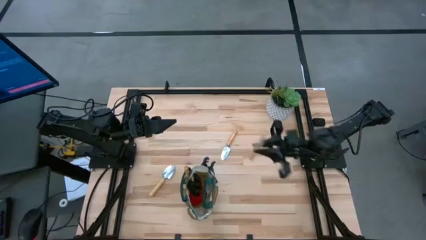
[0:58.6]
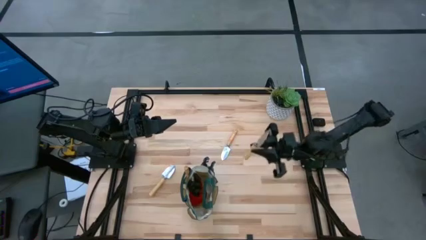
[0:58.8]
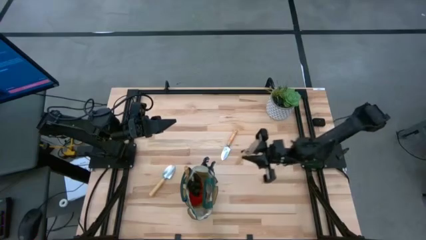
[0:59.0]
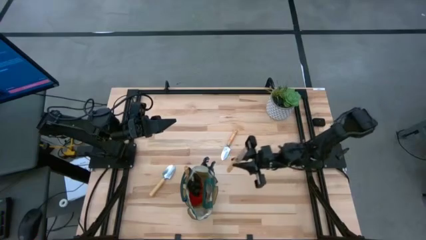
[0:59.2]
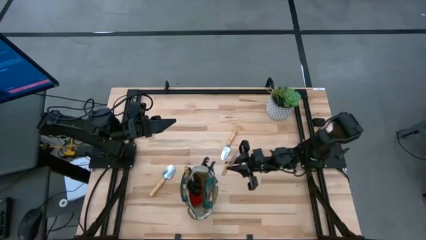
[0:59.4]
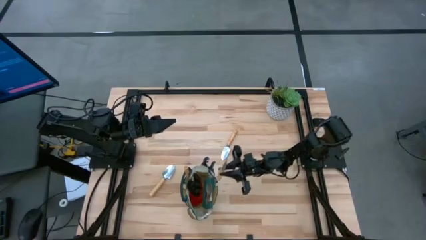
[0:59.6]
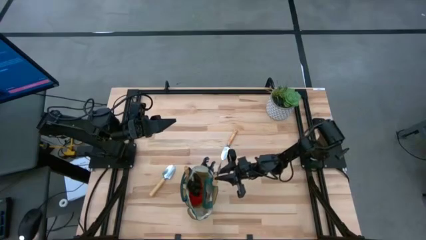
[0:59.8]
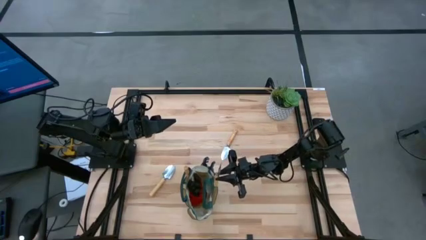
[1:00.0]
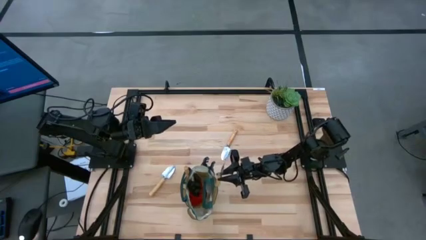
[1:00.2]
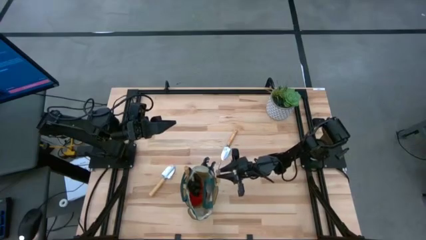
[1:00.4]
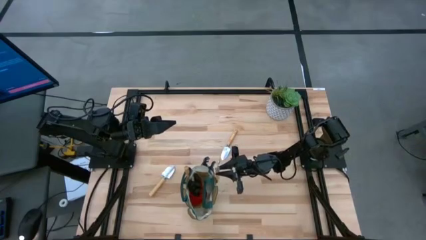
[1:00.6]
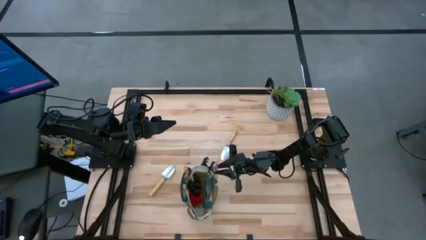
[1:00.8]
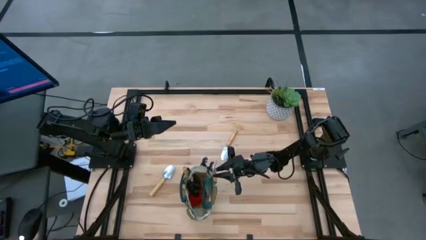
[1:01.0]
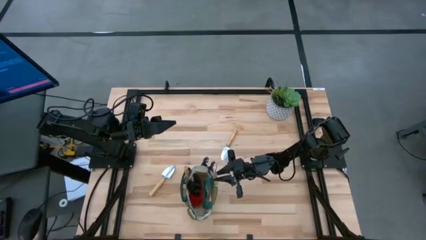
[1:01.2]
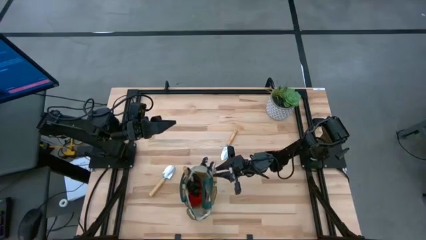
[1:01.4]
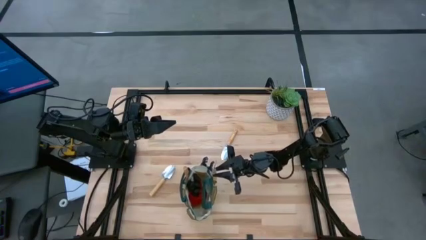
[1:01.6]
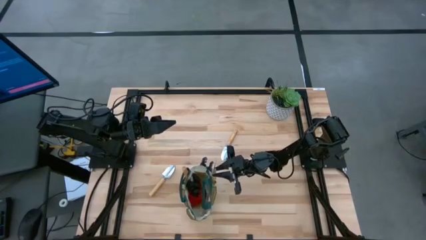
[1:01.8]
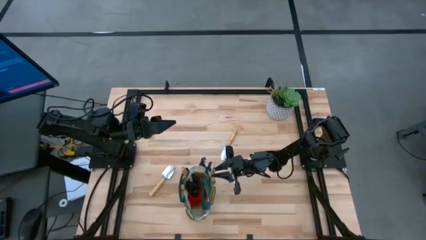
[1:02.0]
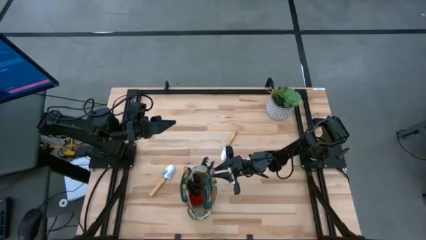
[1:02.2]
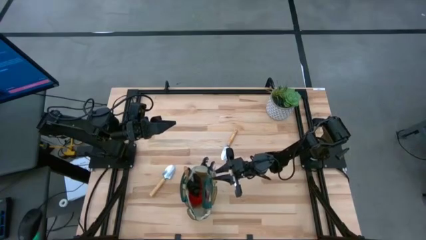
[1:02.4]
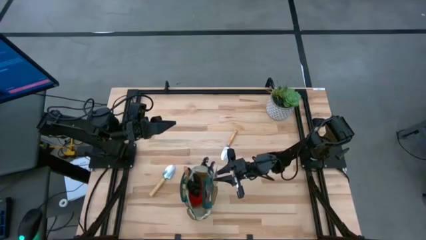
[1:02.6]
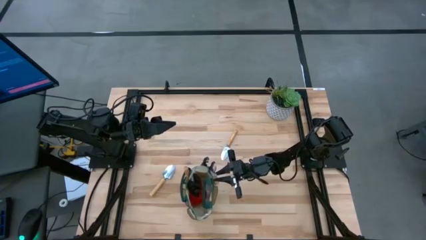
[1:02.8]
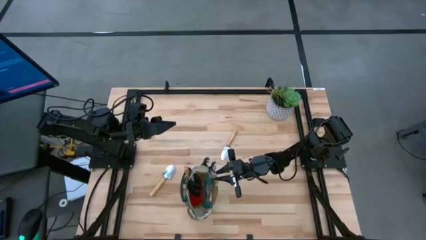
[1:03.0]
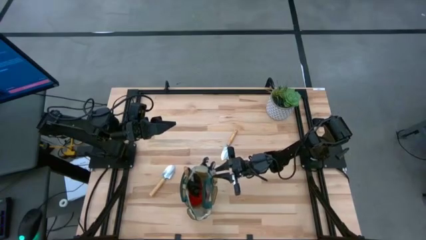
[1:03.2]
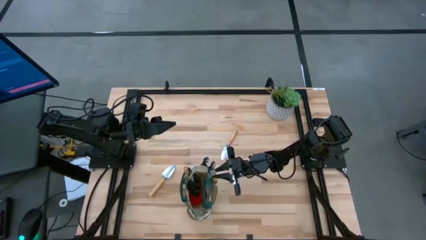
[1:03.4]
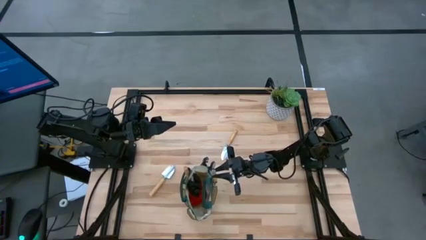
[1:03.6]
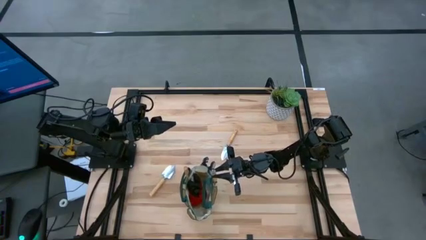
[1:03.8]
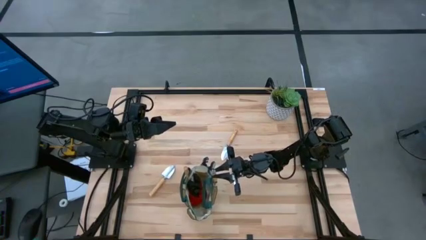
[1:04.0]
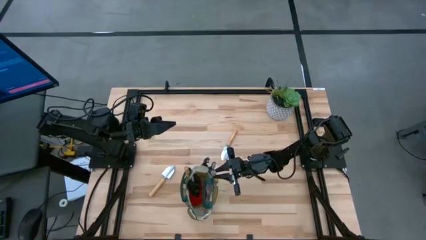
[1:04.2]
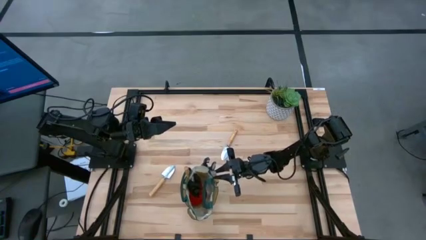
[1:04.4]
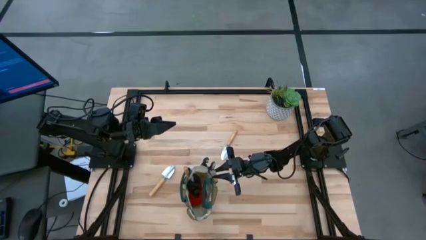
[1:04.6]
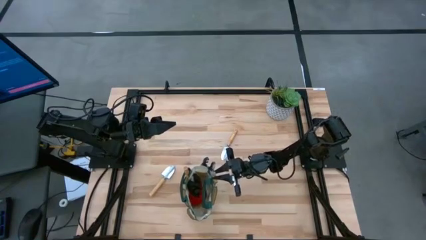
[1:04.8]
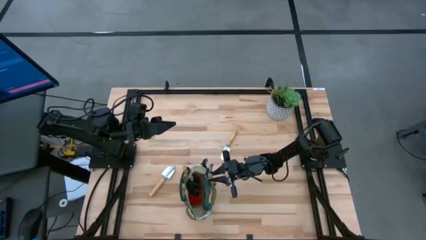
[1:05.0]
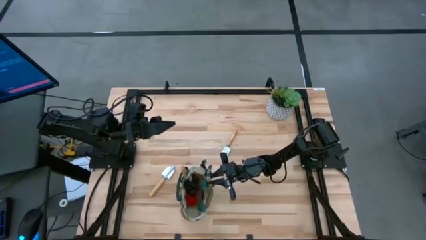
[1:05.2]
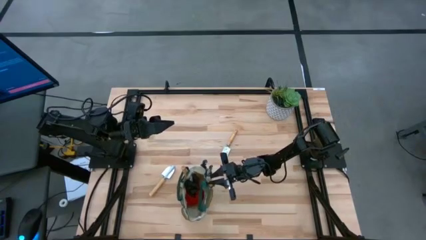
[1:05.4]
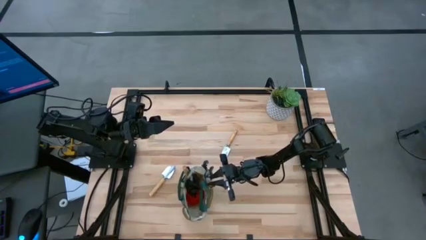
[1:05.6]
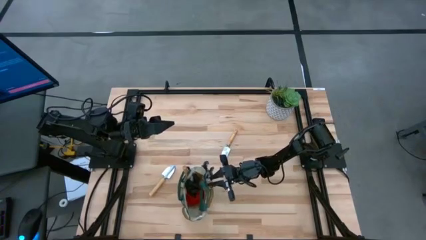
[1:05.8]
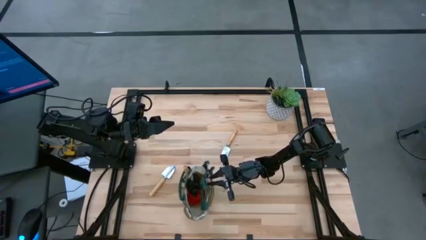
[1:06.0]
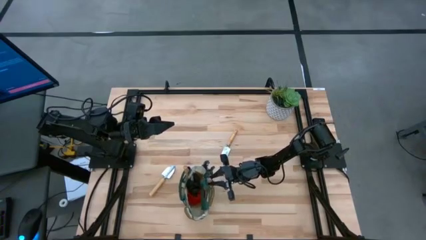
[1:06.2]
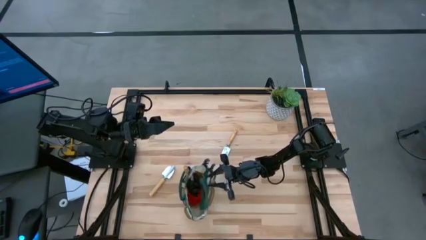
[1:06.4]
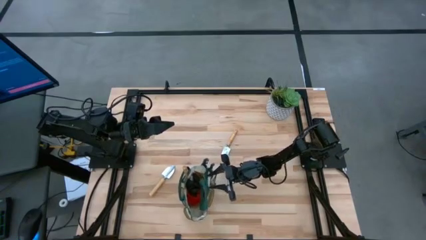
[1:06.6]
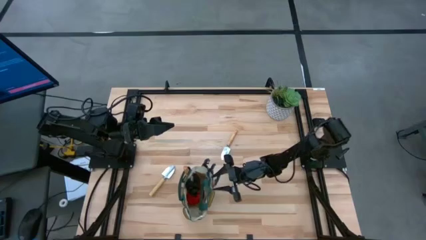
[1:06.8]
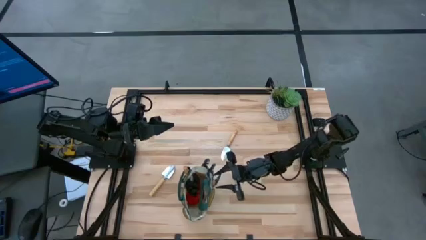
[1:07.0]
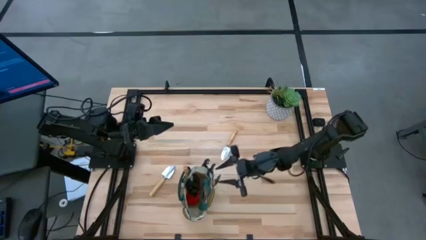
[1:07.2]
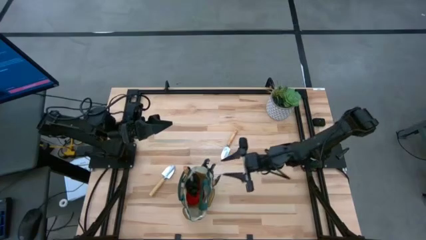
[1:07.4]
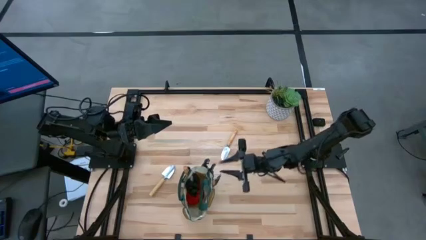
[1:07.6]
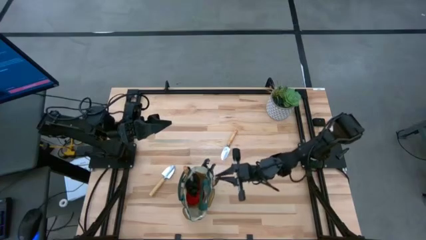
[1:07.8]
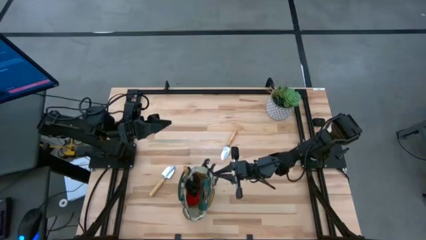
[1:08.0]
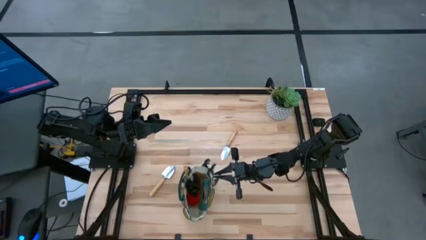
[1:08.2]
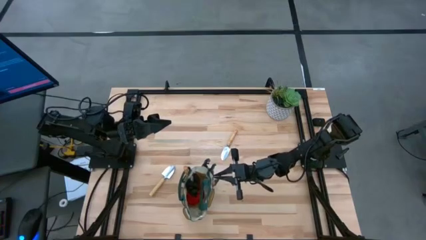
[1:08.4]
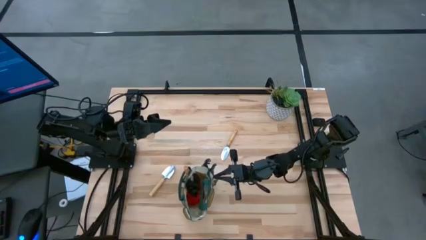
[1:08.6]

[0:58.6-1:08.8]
Task: Pick & Place Garden tools in Gardening bag
Put the brown trowel into the gardening bag
